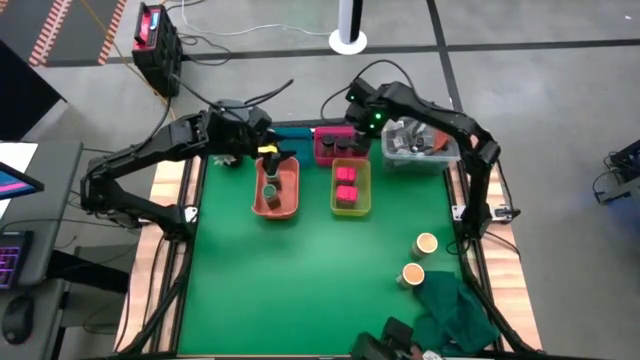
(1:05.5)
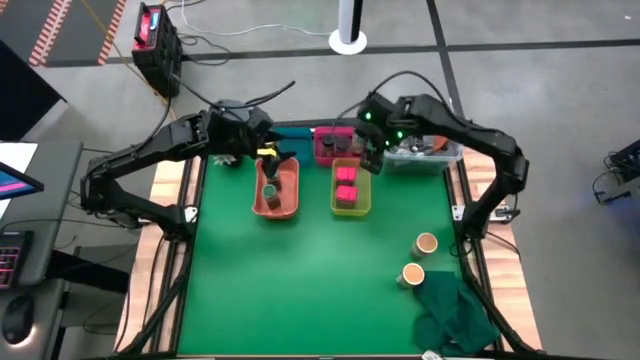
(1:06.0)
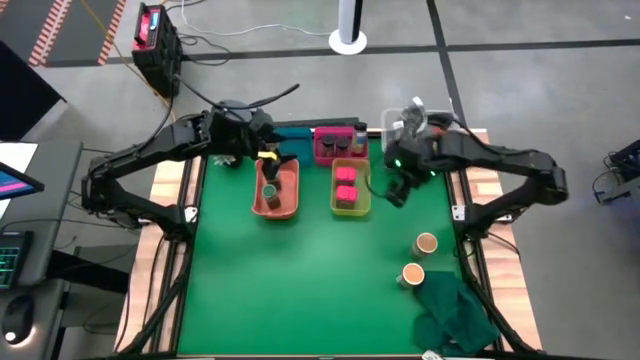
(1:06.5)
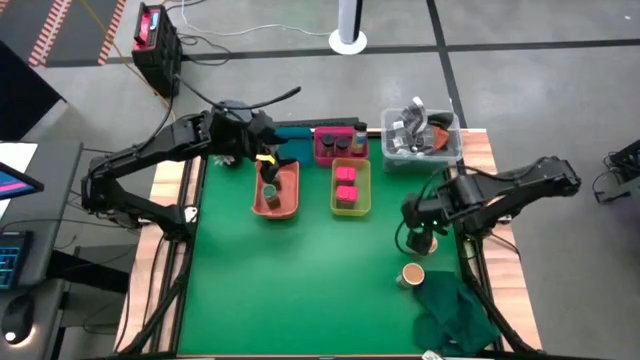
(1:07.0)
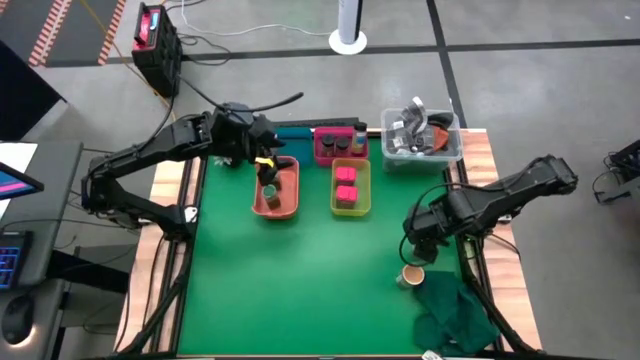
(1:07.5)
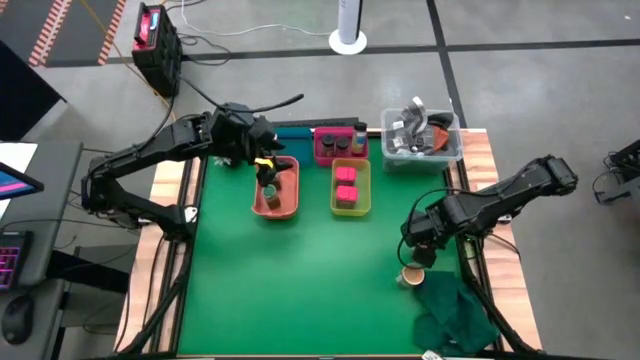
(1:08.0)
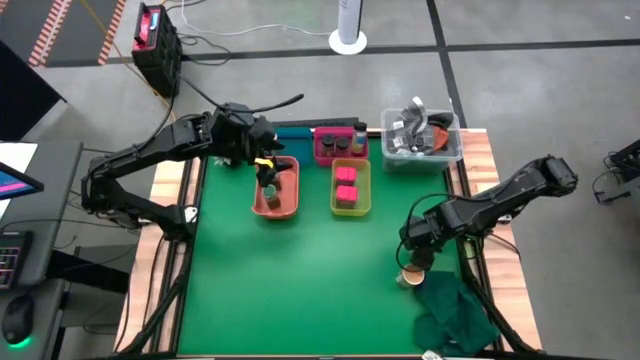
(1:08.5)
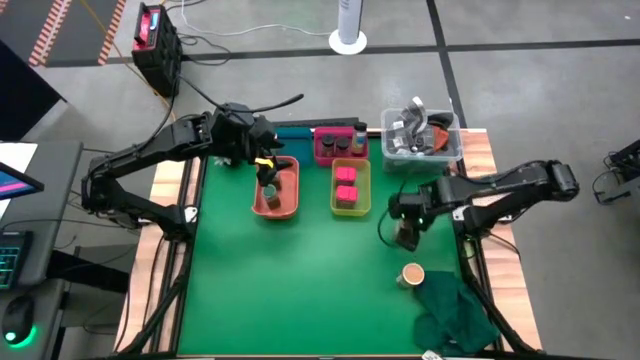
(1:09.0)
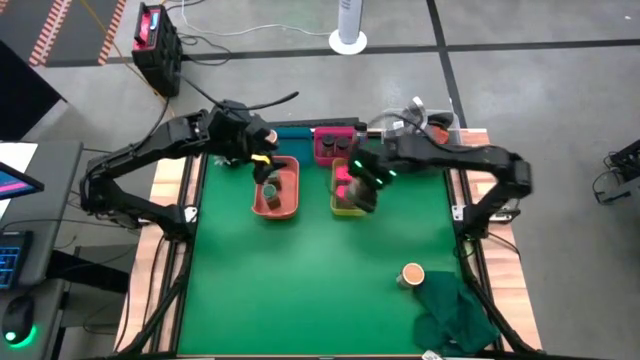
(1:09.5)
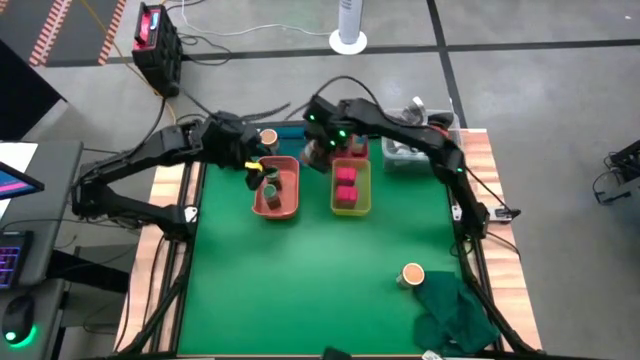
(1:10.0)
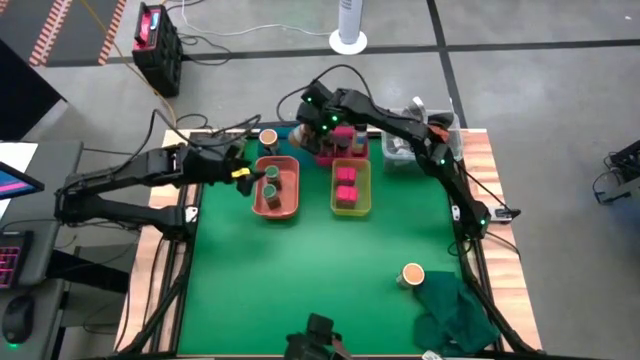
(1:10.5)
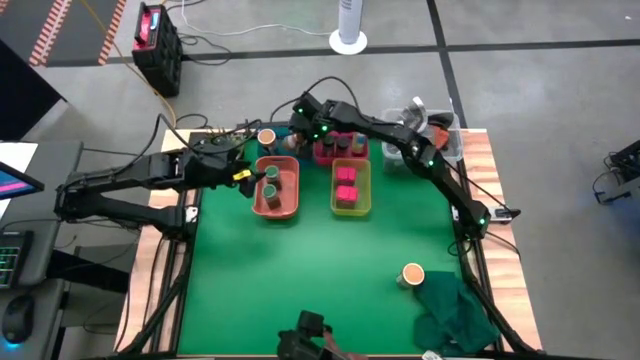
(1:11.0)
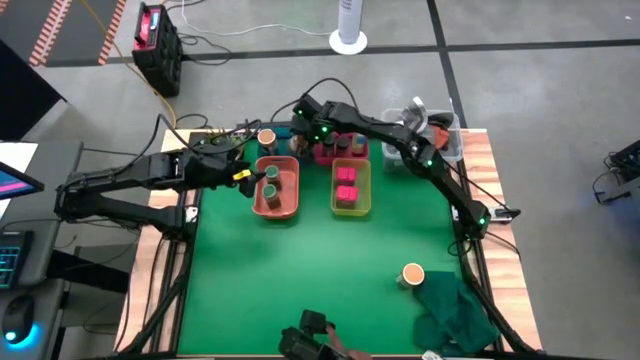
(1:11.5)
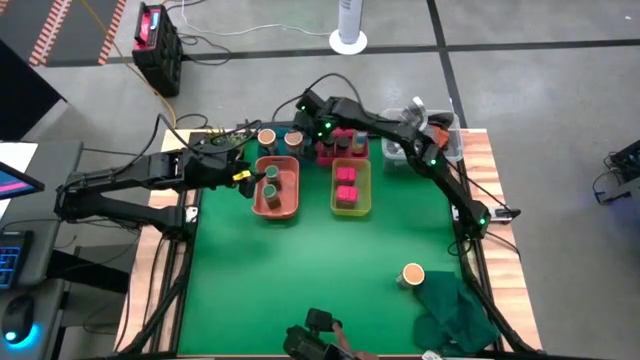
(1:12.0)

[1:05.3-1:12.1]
Task: Sort spices by type
Put the top brown seasoning bottle into the blue bin

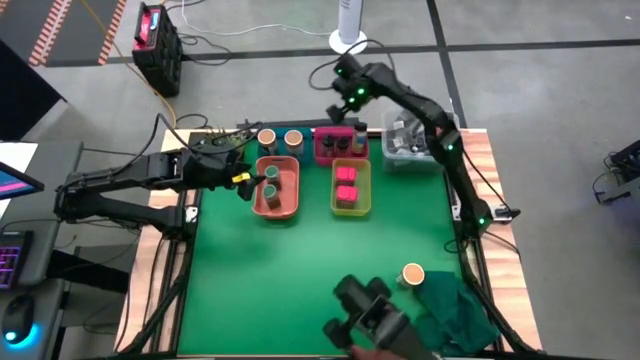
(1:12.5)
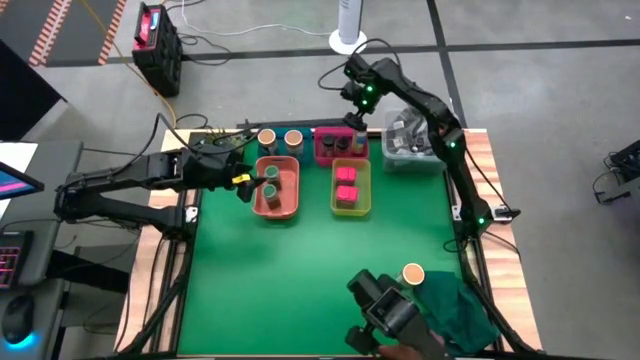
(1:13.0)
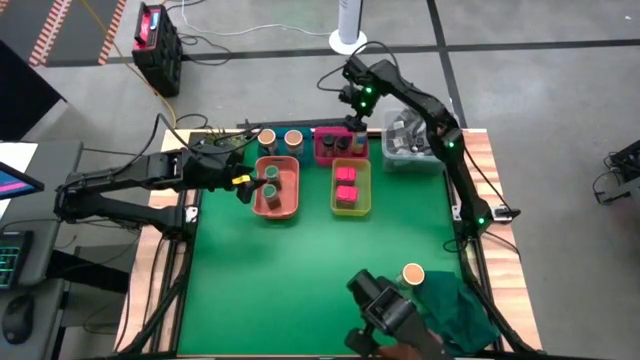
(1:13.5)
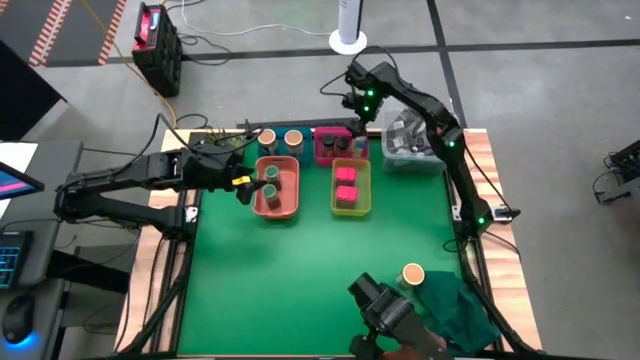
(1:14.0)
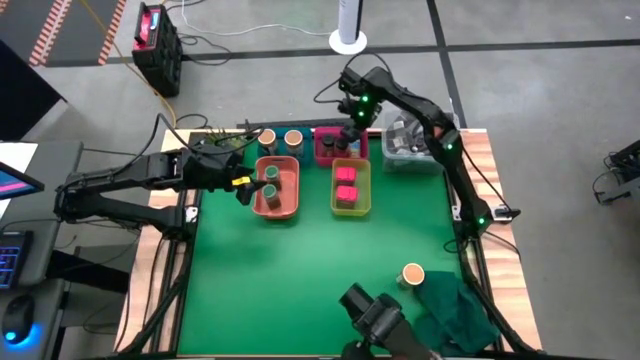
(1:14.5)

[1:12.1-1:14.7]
Put the black seasoning bottle into the red bin upright

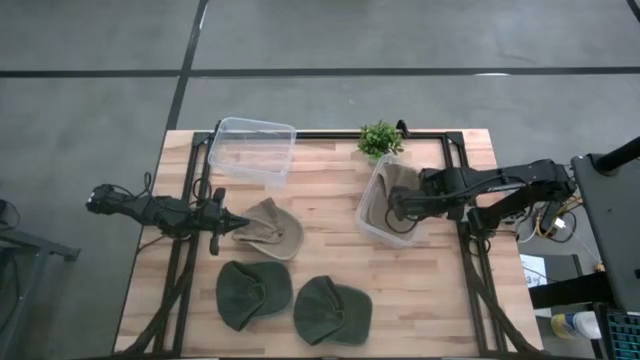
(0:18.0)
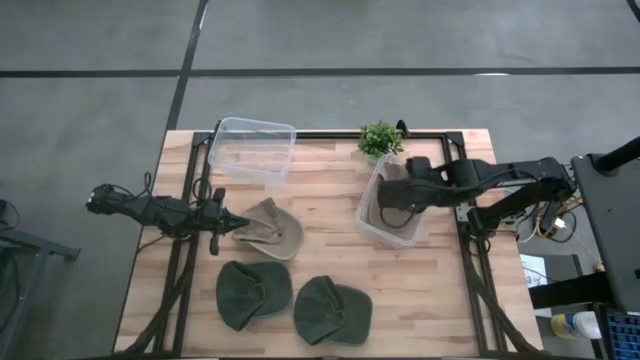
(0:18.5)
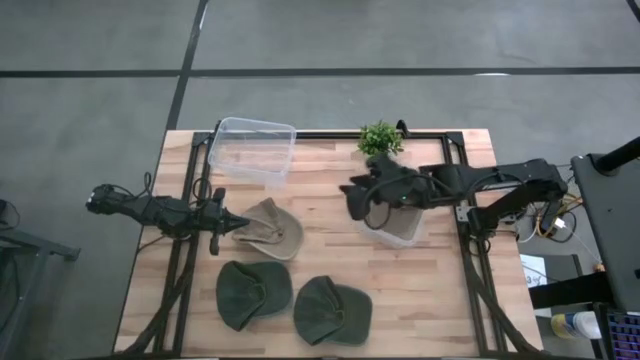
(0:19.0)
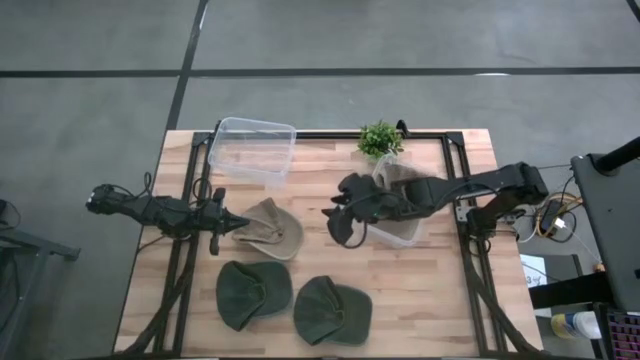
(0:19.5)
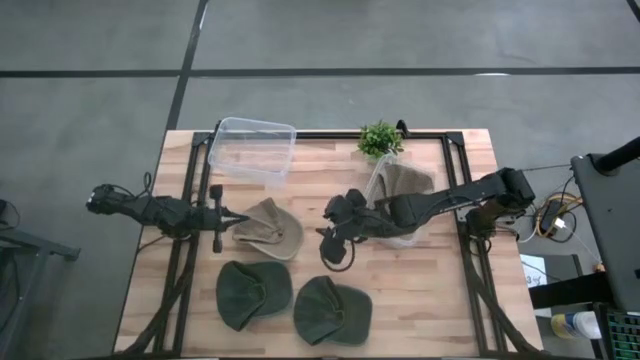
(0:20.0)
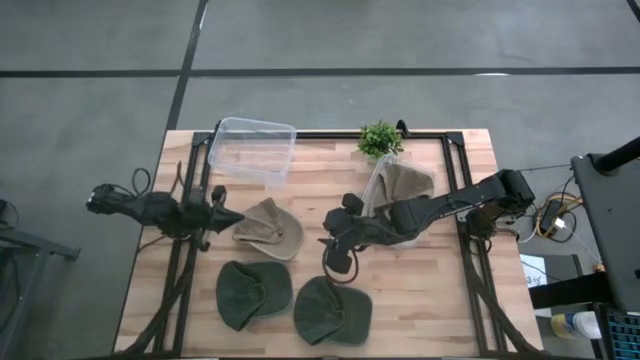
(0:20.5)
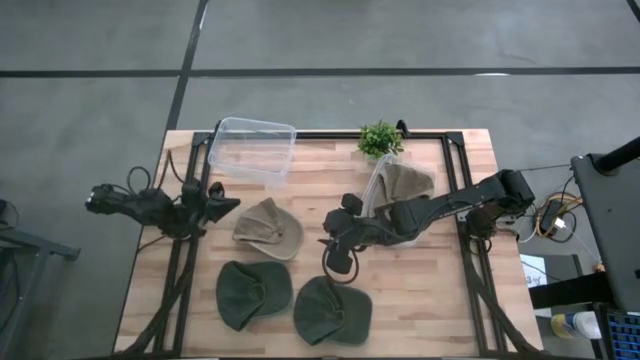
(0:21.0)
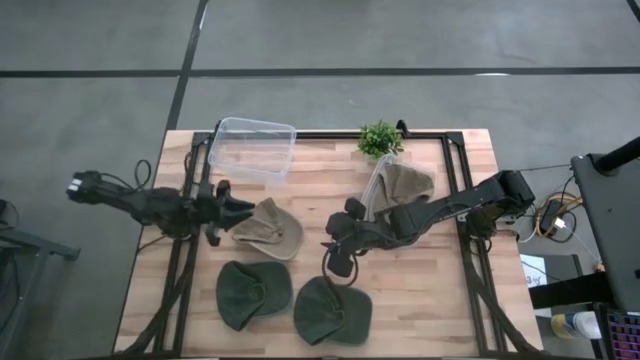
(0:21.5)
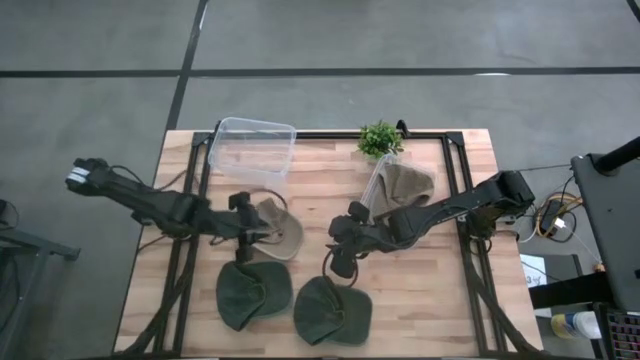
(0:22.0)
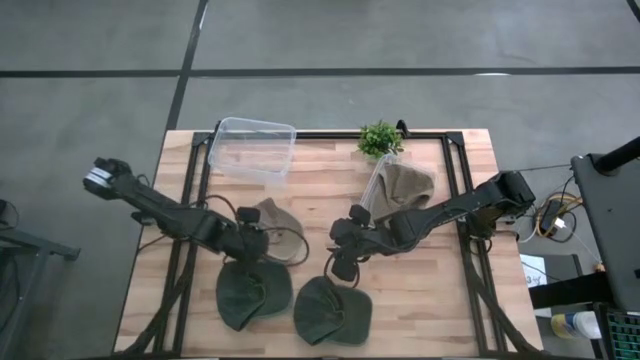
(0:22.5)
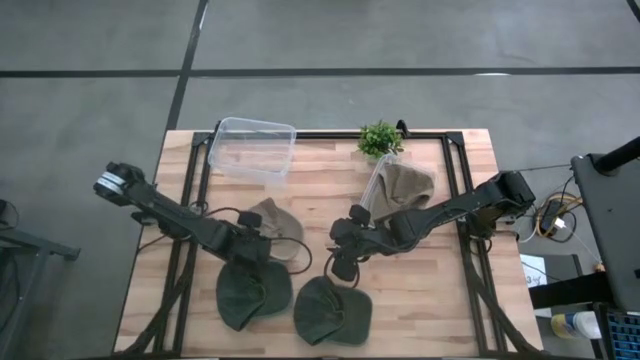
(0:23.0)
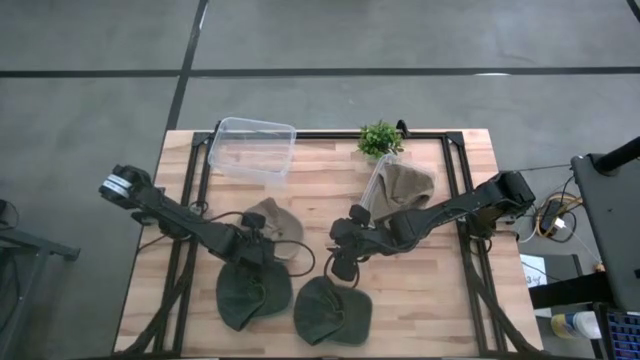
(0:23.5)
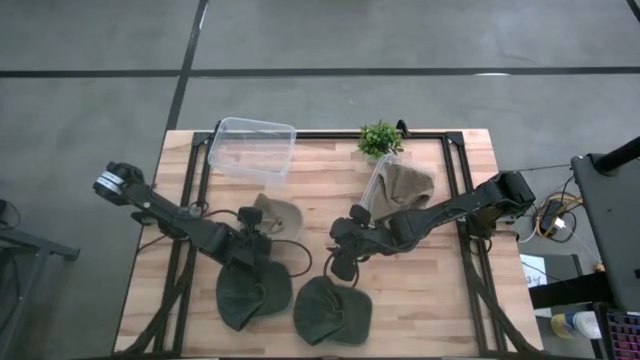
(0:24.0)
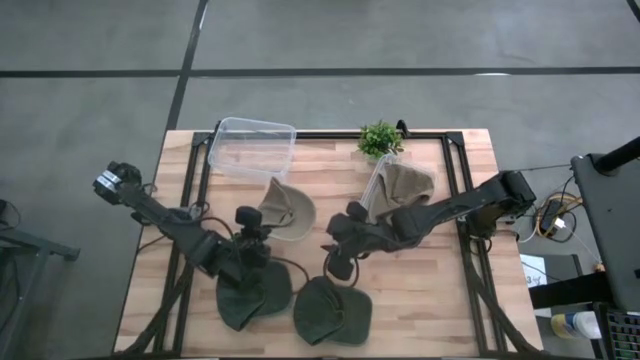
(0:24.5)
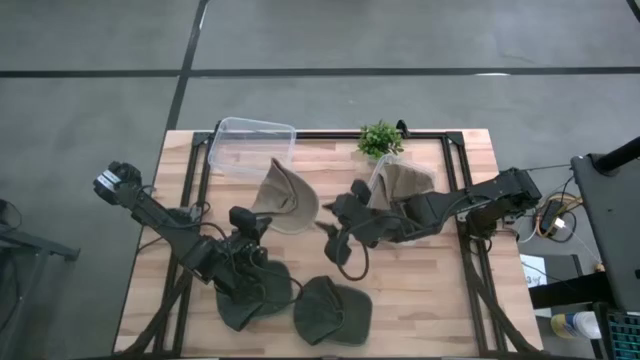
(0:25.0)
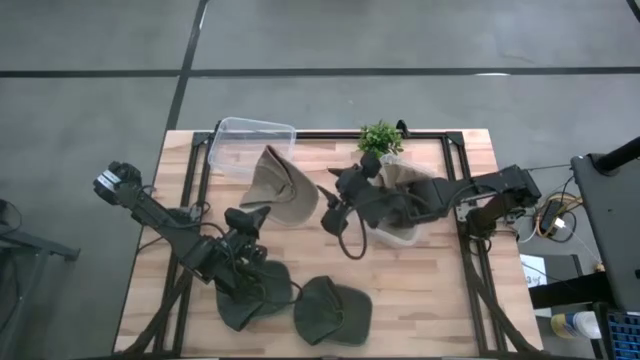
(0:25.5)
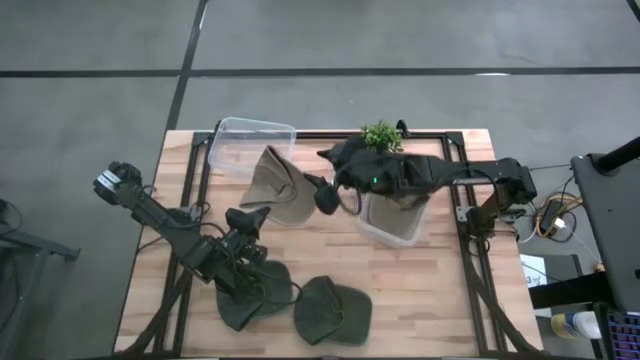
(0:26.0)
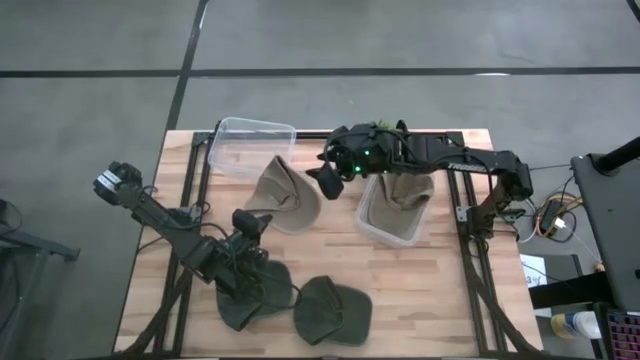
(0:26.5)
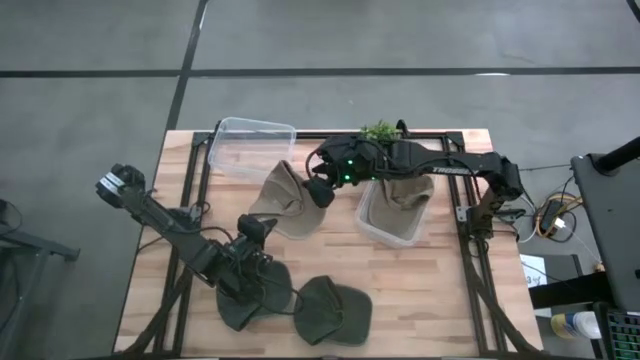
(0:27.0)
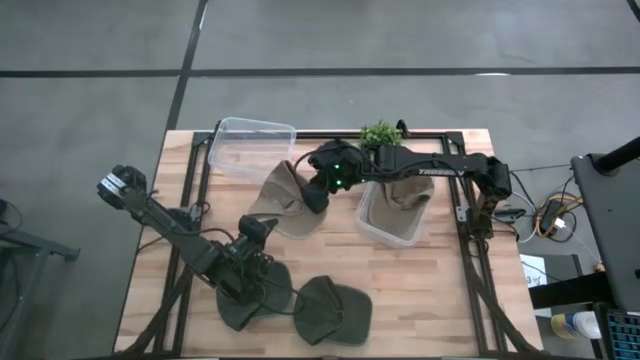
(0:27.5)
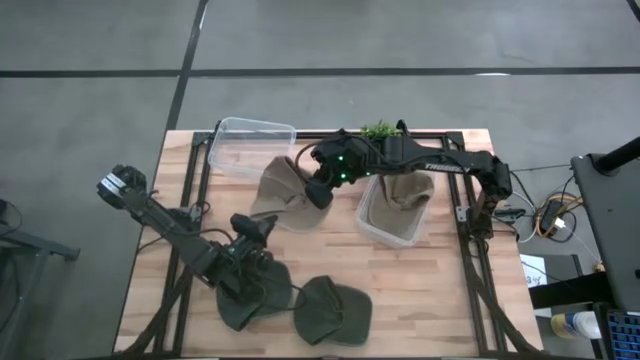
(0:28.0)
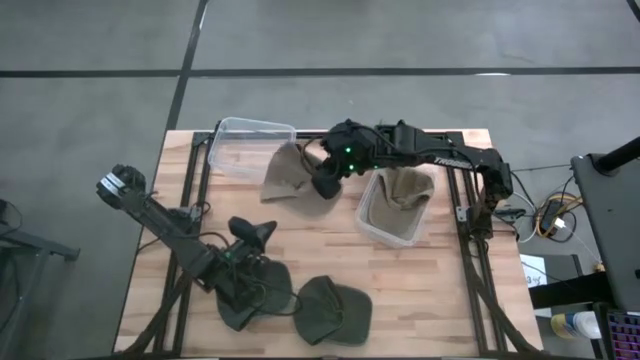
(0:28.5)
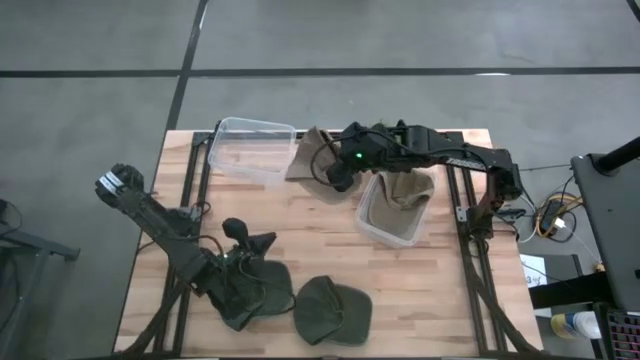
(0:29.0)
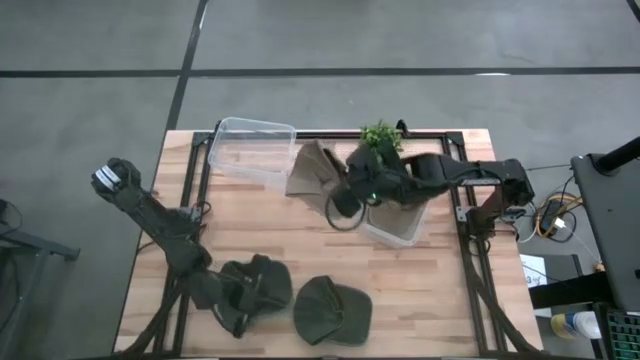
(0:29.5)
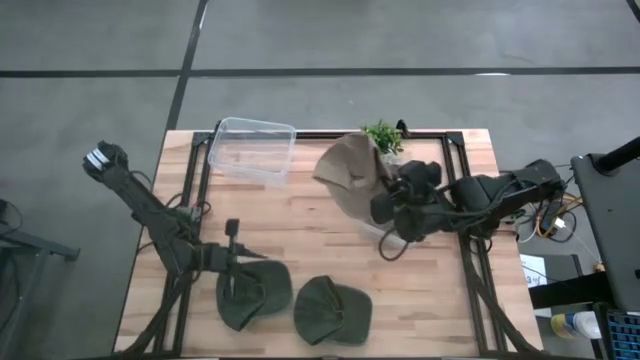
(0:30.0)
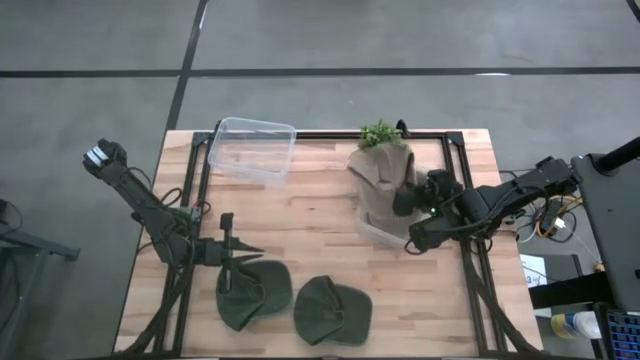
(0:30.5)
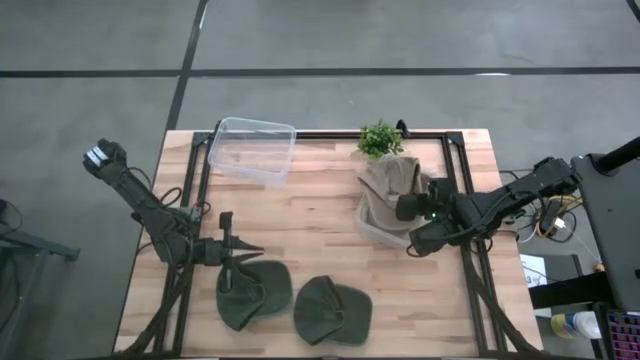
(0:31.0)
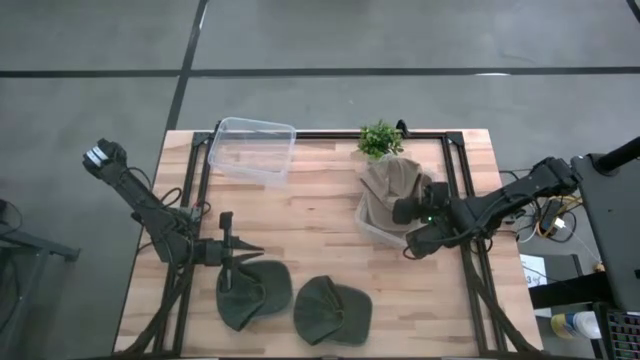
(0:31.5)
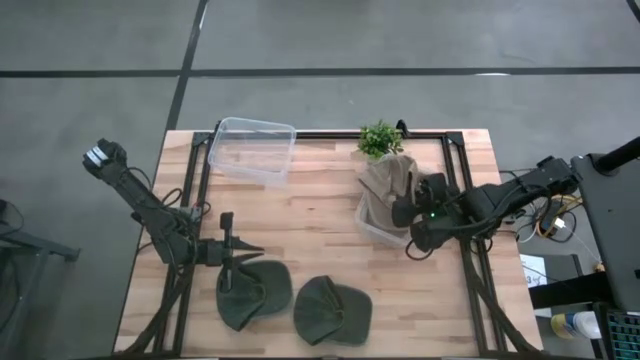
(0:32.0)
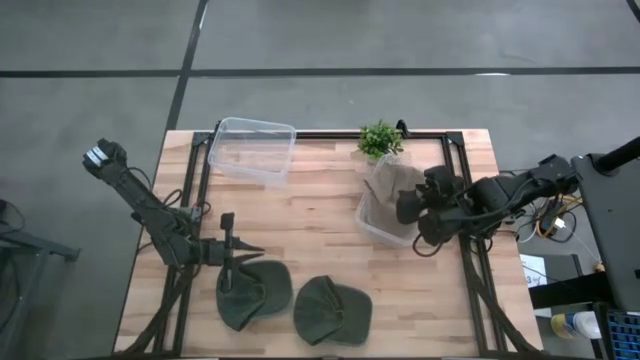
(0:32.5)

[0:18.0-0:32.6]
Task: Pick & Place hat
Put the brown cap into the right transparent bin
